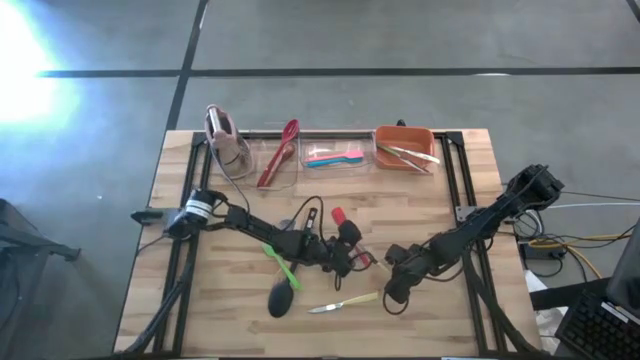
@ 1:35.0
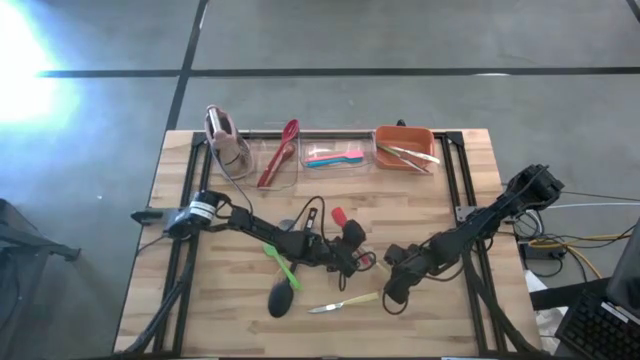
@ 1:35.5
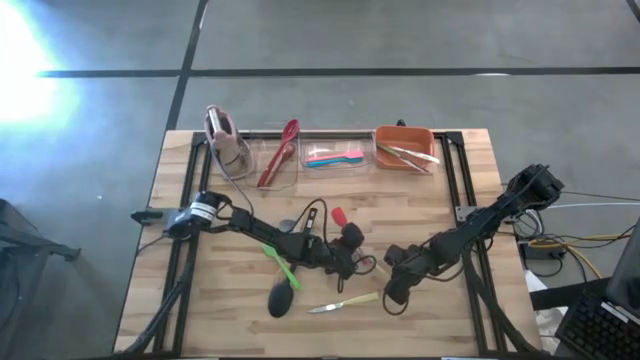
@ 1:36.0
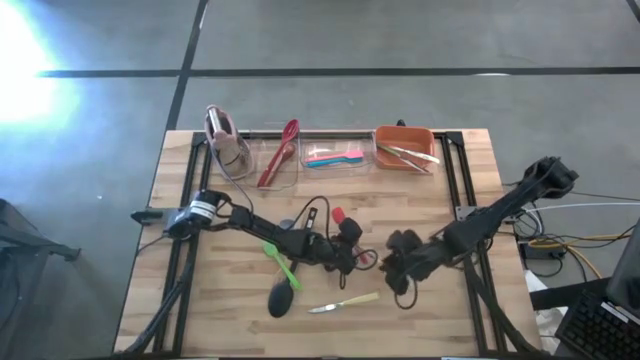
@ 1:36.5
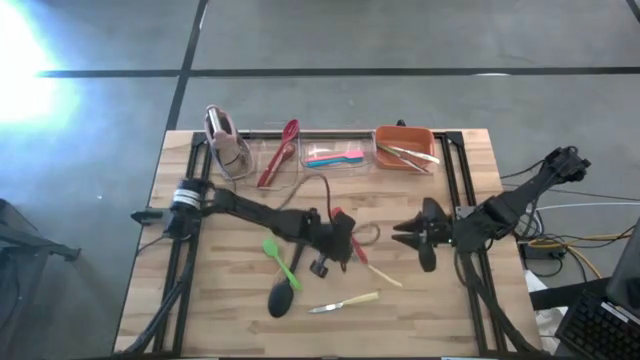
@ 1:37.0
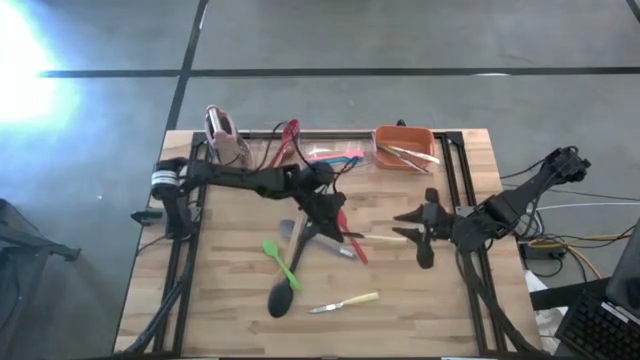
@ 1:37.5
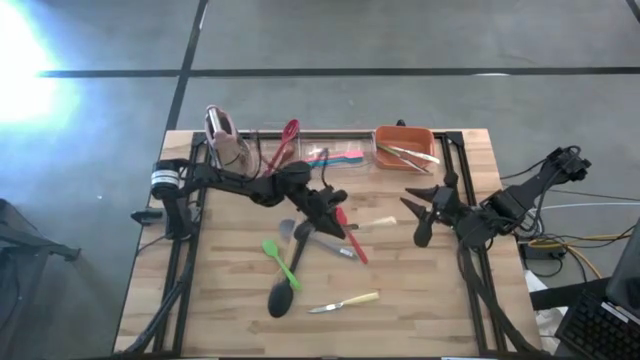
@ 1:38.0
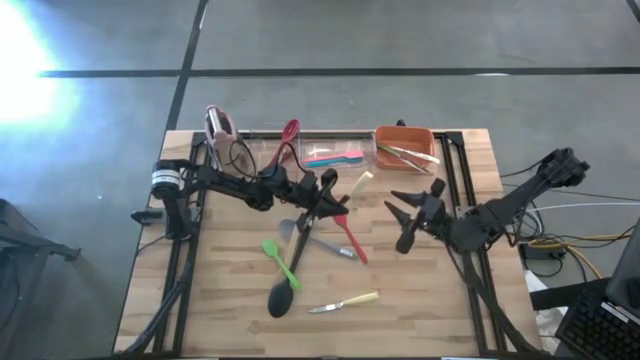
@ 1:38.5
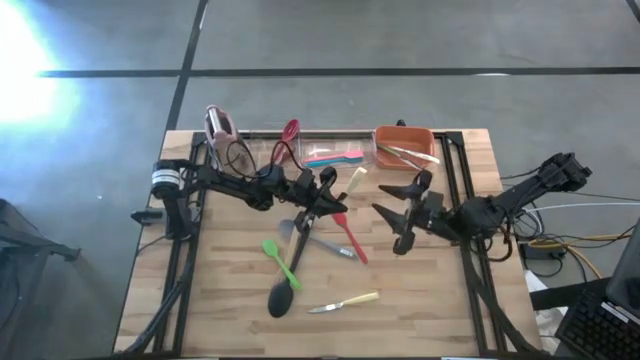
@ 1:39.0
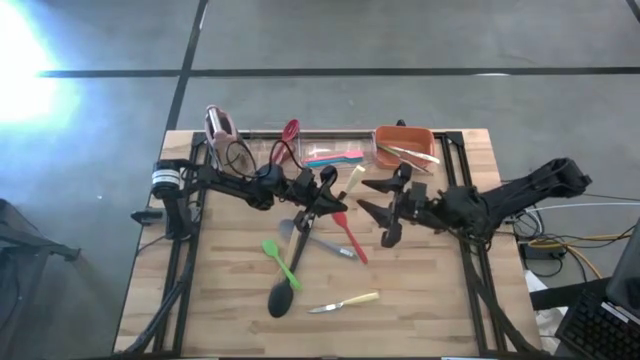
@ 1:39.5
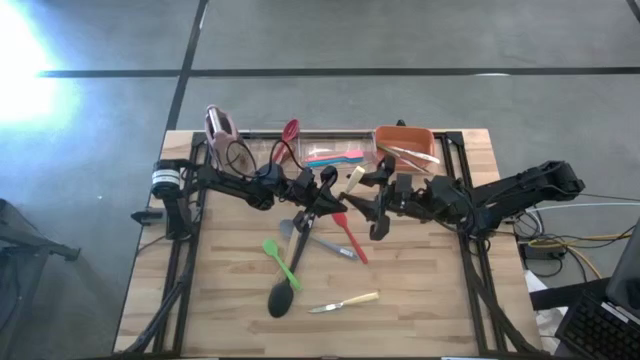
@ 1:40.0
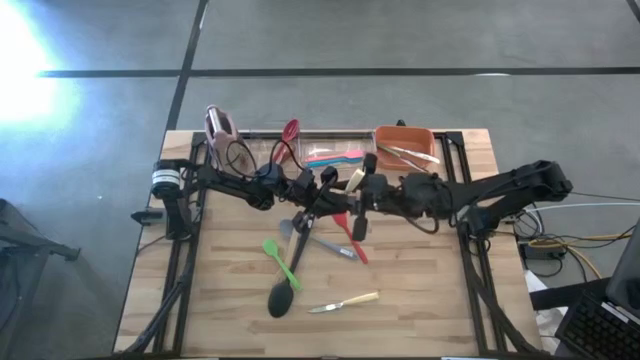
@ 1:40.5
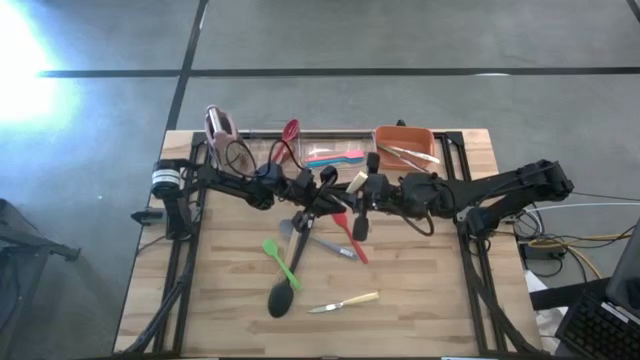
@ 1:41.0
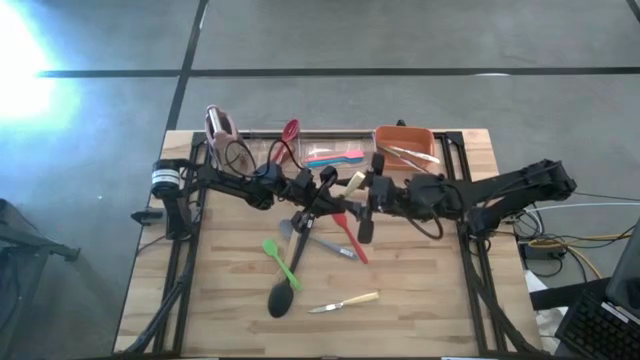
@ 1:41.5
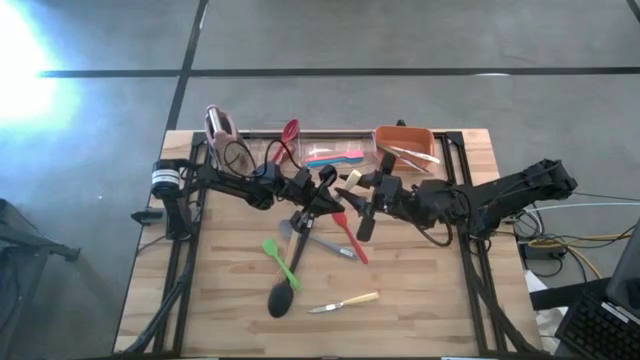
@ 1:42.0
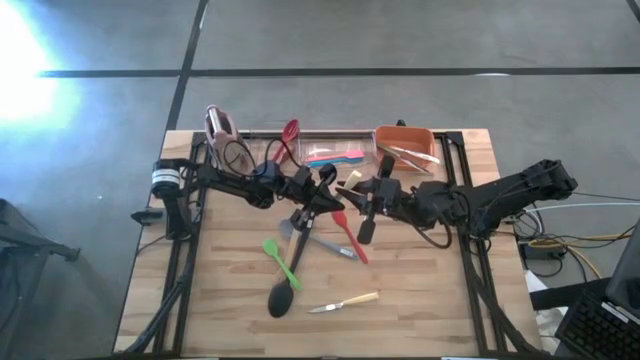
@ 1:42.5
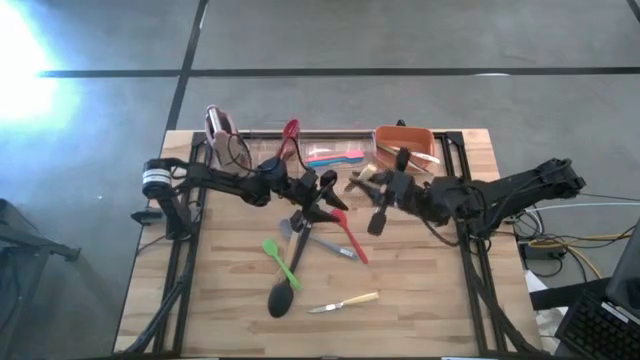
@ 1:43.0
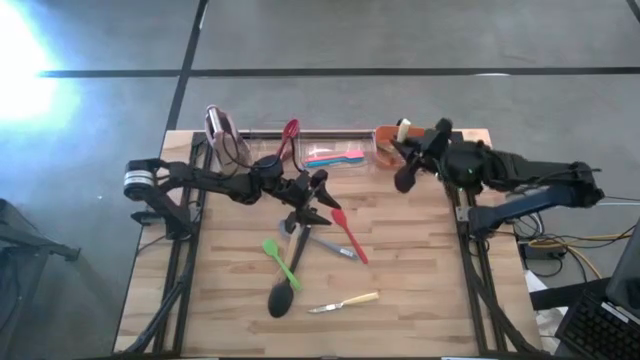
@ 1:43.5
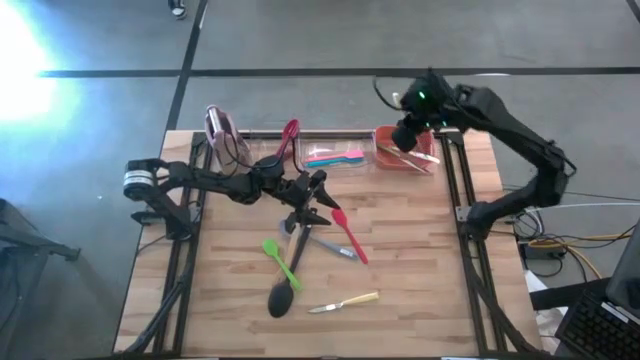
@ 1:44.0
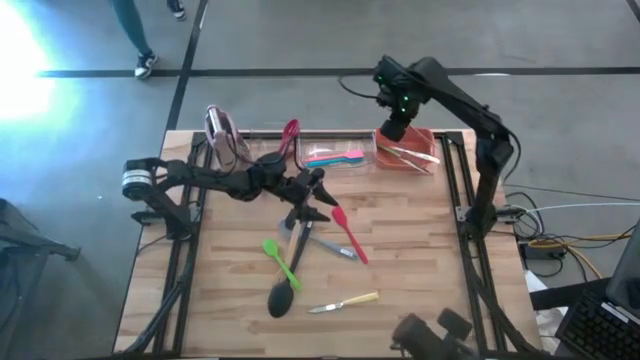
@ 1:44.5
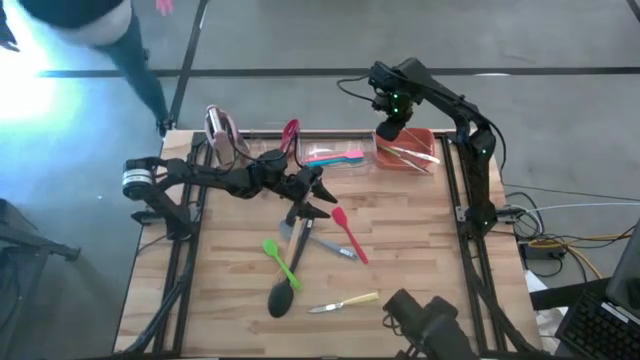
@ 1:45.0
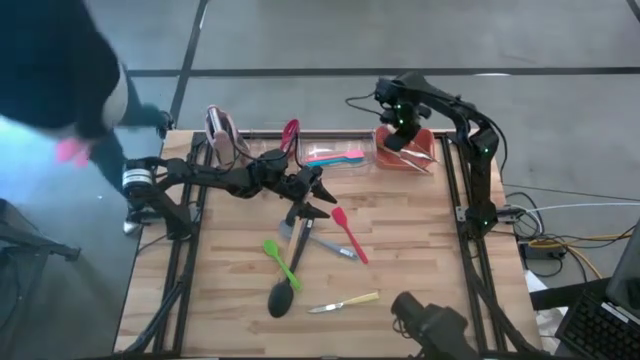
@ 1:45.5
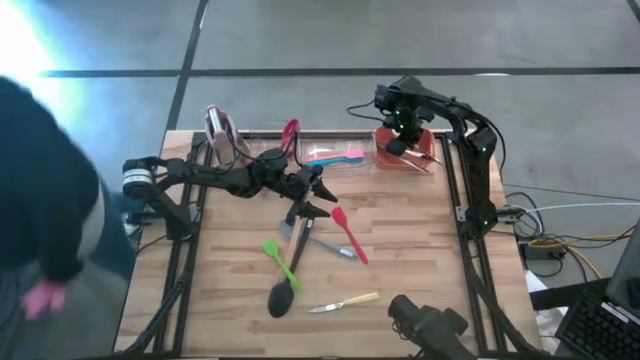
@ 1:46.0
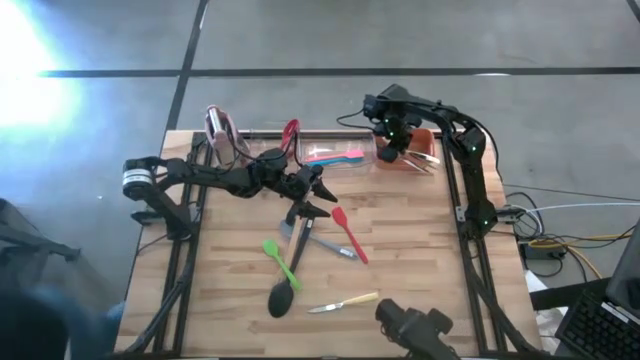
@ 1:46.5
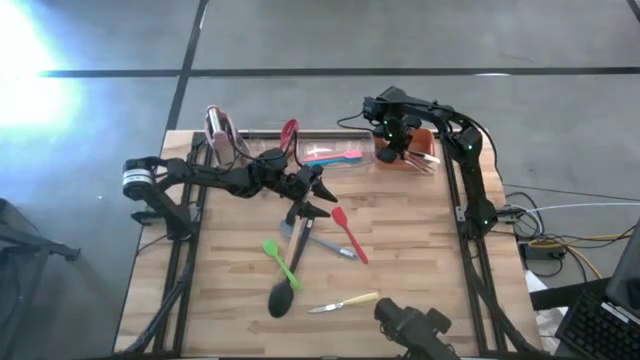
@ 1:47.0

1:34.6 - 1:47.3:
Task: Pick & Place Kitchen Items
Put the right yellow knife into the orange bin

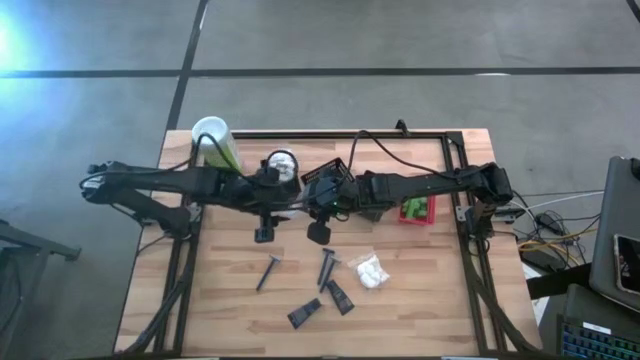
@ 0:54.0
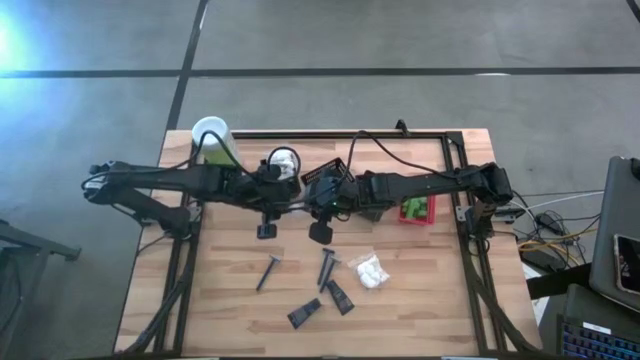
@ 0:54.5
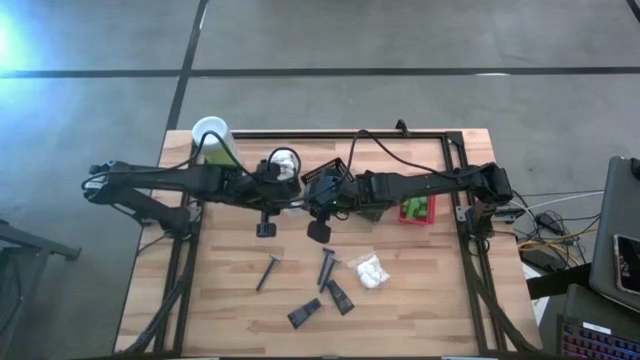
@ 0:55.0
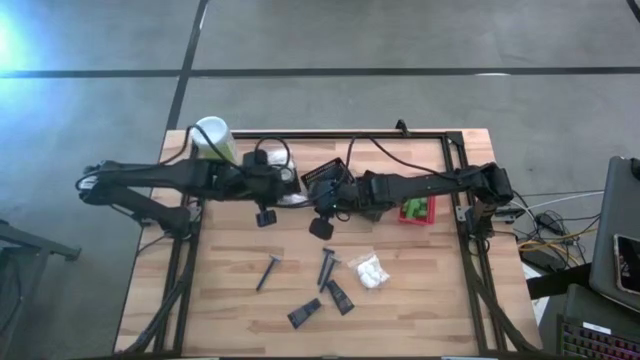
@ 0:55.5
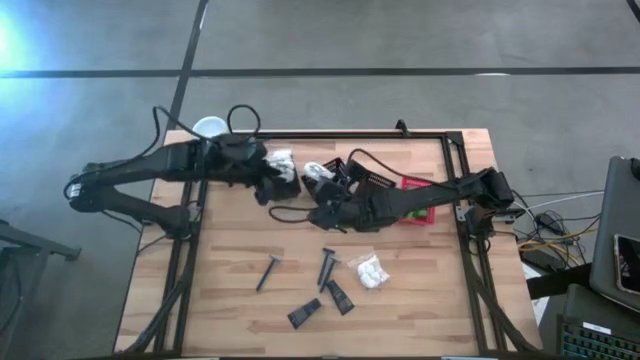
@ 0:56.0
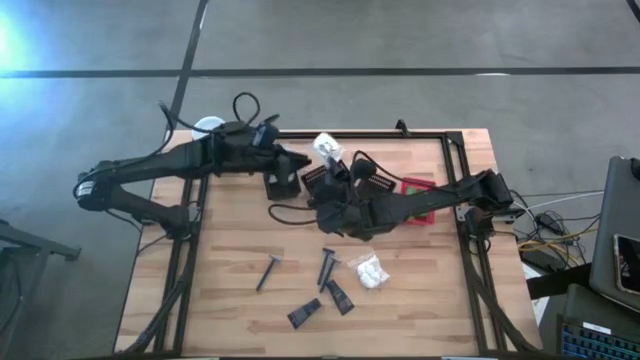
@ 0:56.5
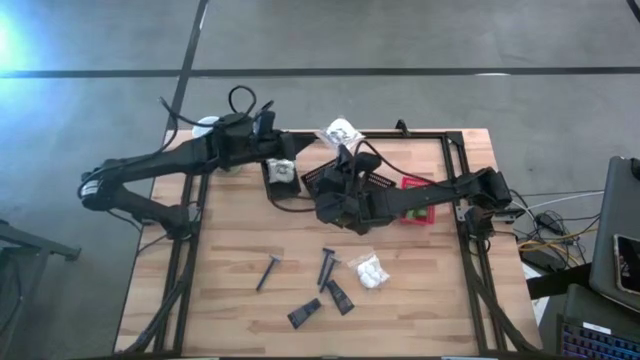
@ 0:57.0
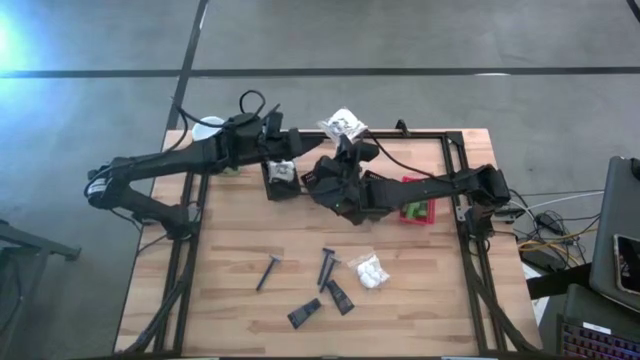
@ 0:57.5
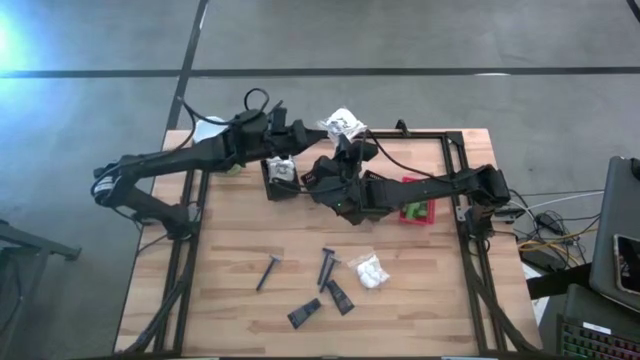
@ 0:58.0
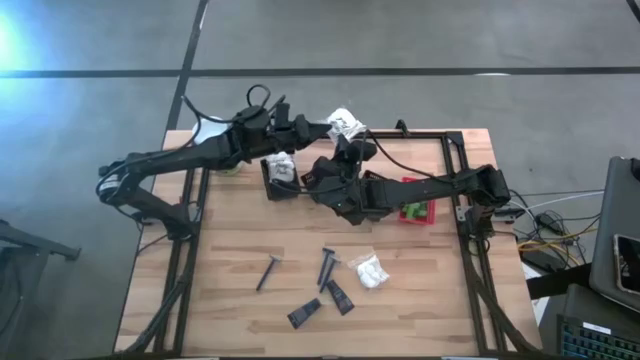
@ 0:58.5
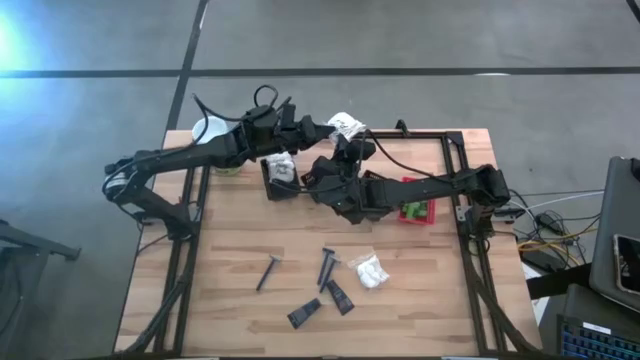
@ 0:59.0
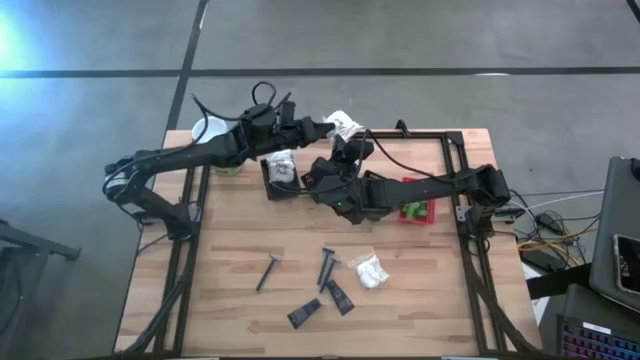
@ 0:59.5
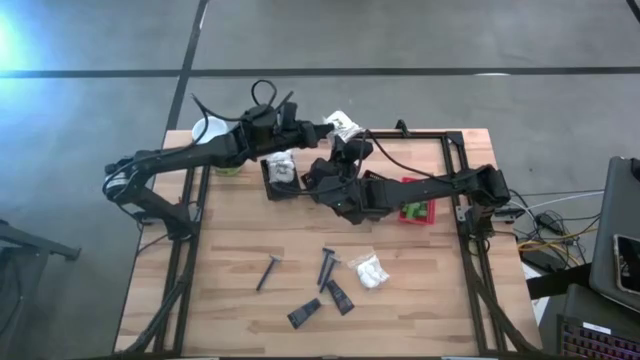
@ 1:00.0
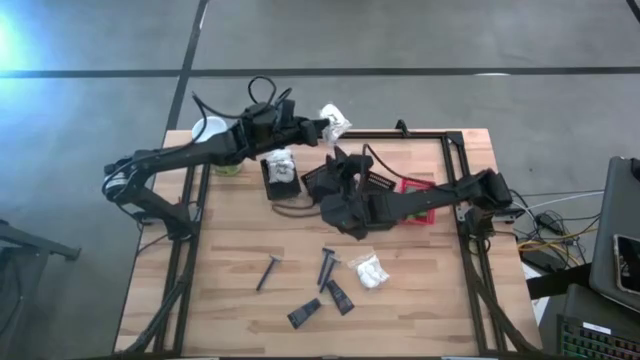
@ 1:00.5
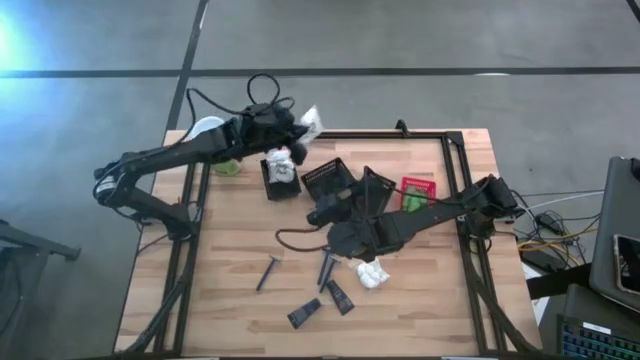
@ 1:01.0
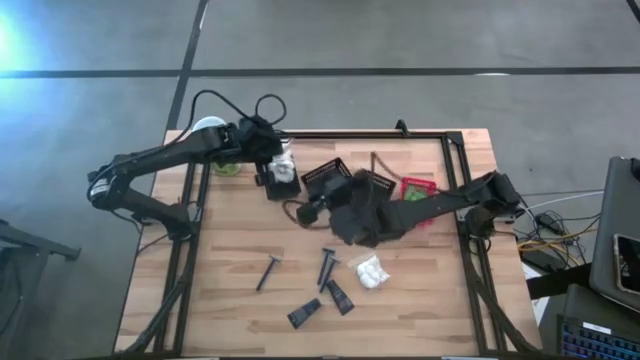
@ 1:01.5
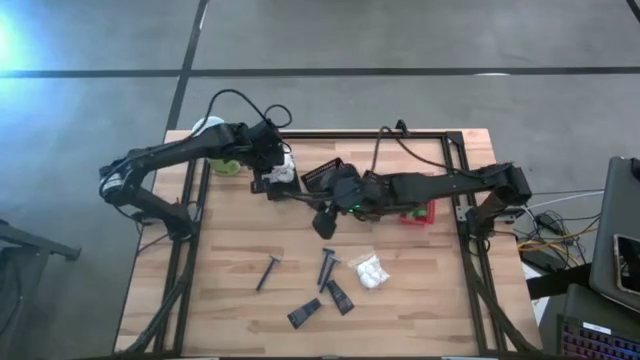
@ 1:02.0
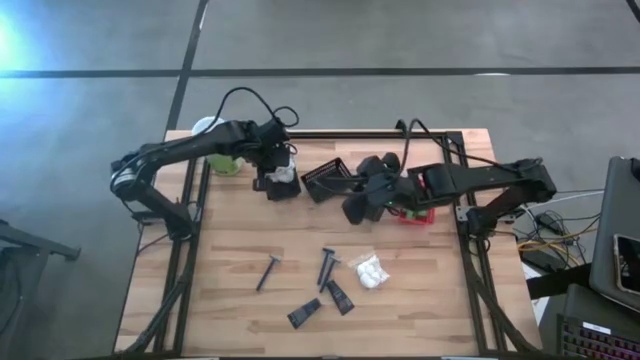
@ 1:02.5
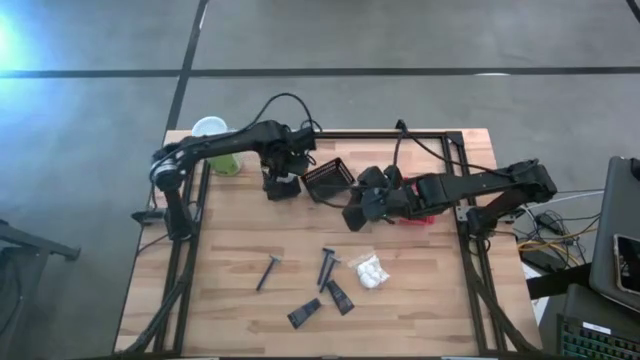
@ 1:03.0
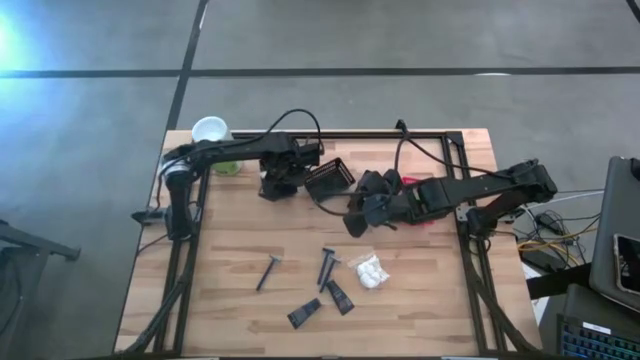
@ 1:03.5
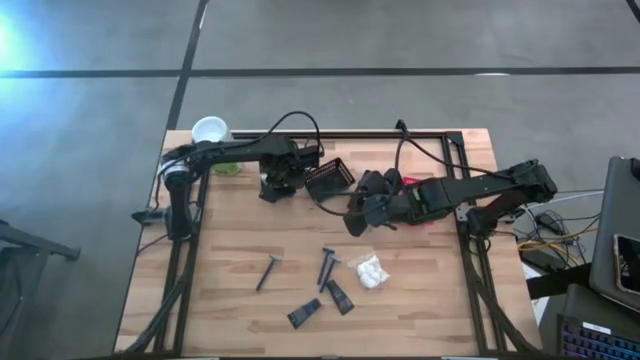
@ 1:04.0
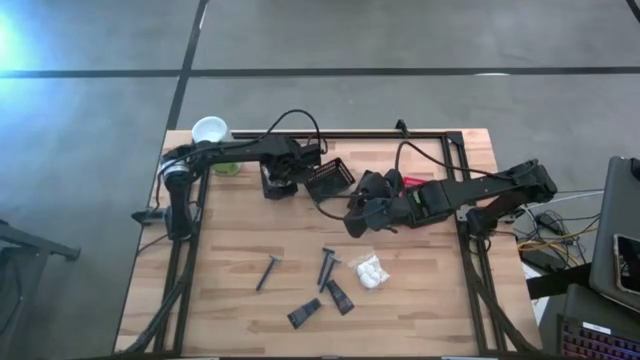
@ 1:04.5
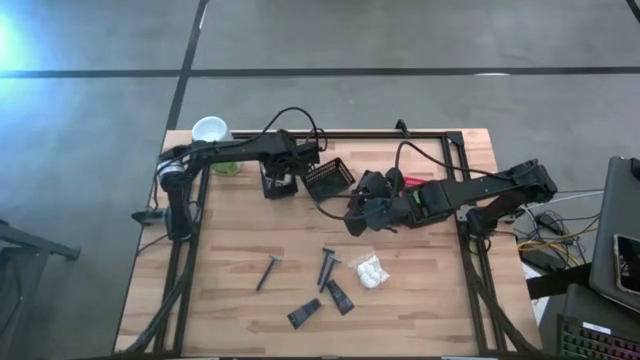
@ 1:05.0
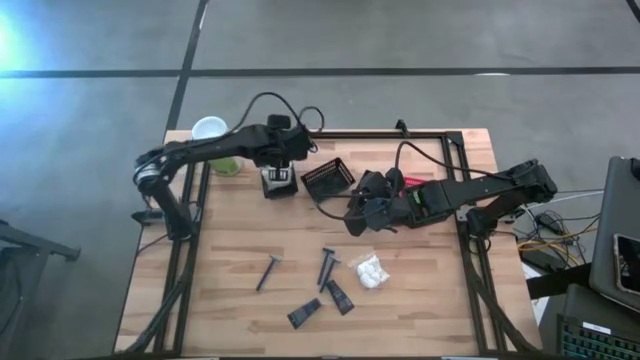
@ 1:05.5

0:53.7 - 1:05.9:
Task: Pick & Place Travel size toiletries
Put the cotton pack into the left black bin
